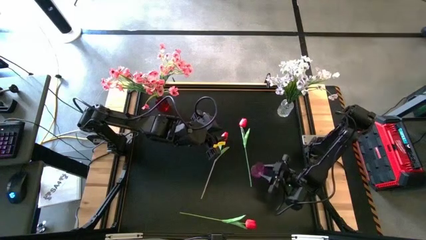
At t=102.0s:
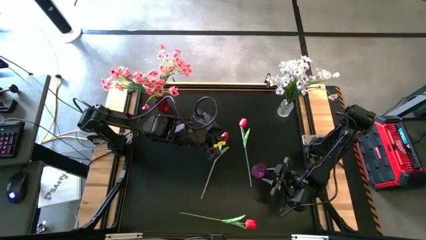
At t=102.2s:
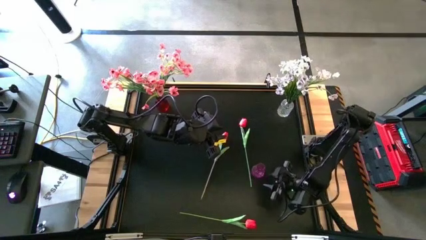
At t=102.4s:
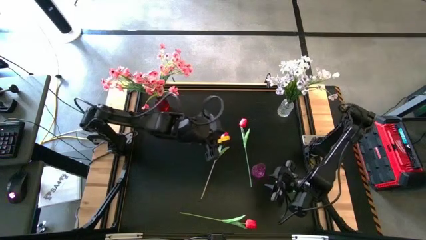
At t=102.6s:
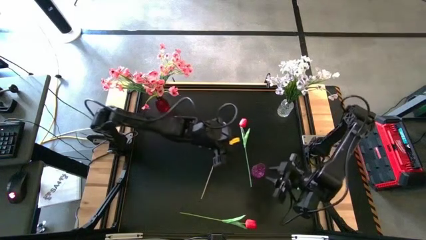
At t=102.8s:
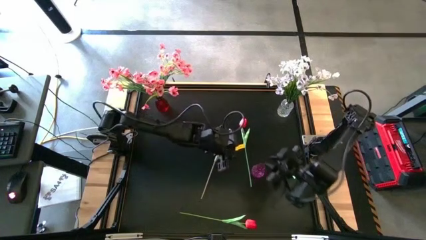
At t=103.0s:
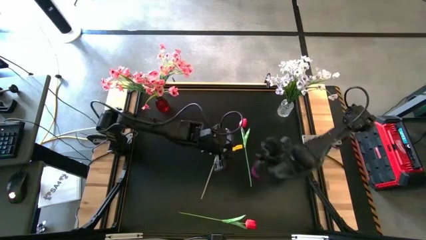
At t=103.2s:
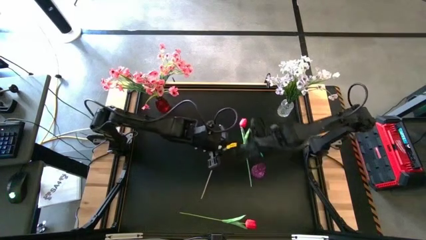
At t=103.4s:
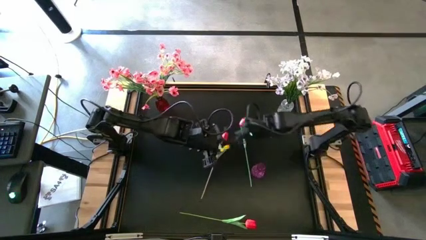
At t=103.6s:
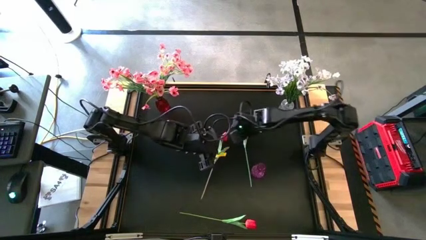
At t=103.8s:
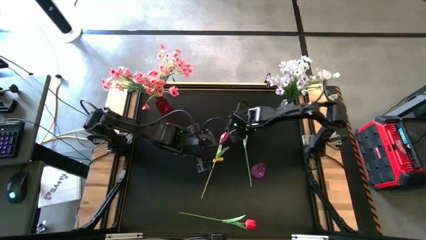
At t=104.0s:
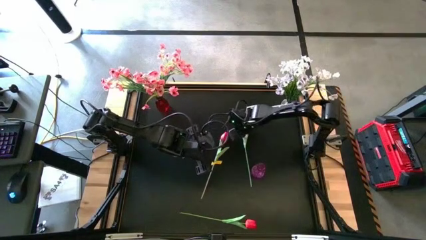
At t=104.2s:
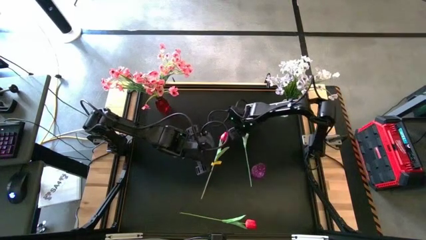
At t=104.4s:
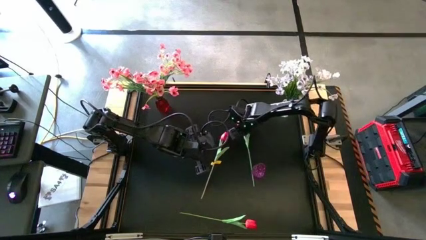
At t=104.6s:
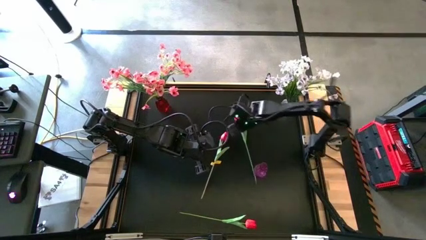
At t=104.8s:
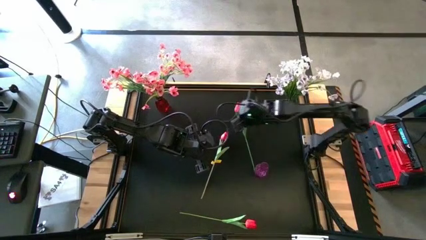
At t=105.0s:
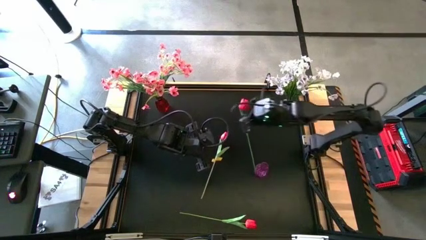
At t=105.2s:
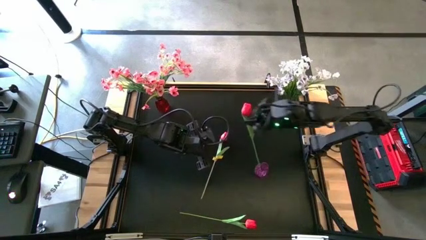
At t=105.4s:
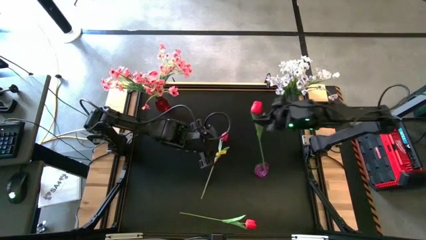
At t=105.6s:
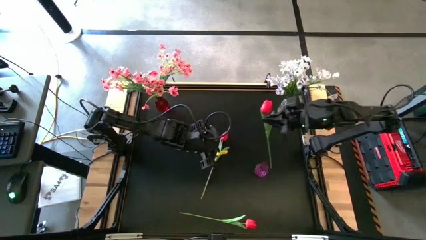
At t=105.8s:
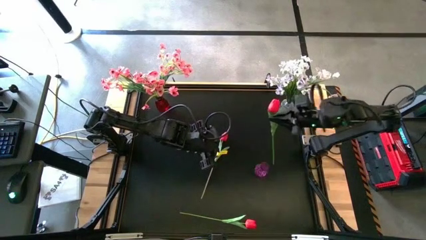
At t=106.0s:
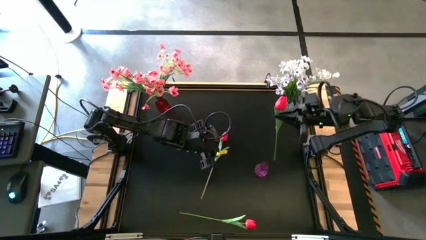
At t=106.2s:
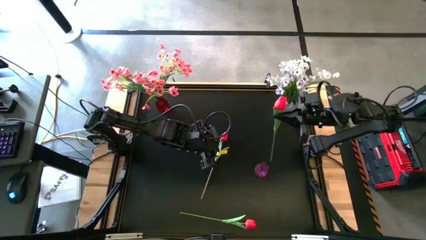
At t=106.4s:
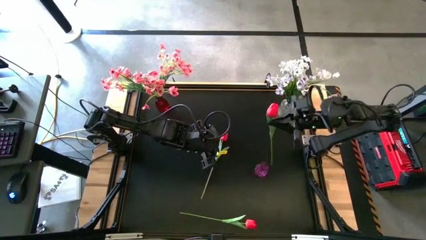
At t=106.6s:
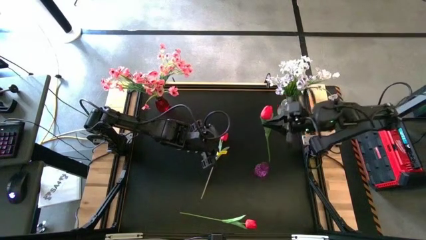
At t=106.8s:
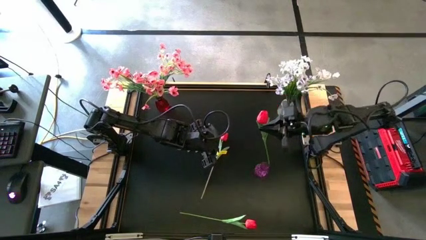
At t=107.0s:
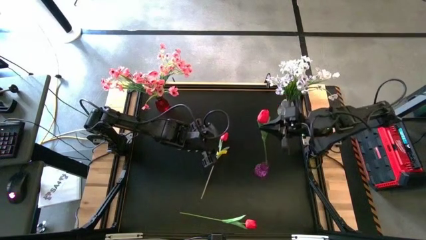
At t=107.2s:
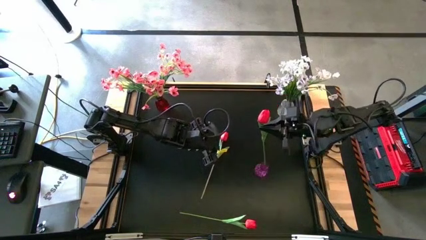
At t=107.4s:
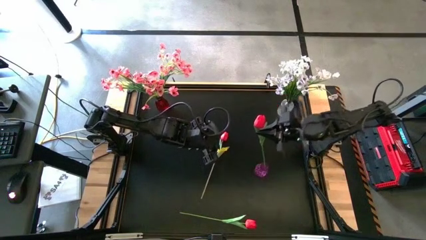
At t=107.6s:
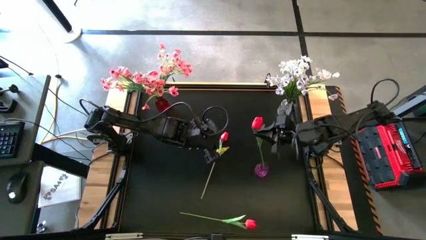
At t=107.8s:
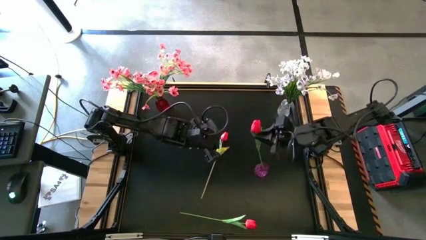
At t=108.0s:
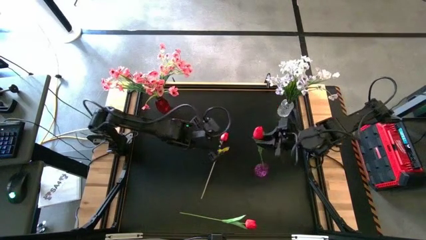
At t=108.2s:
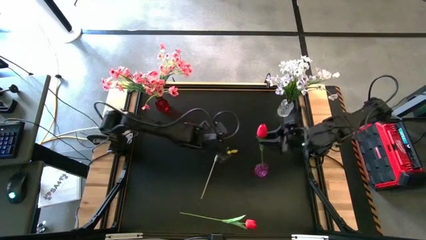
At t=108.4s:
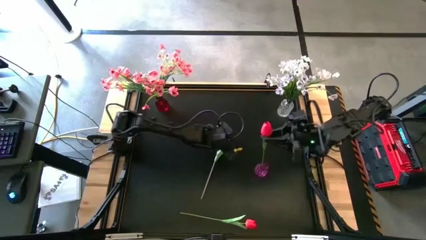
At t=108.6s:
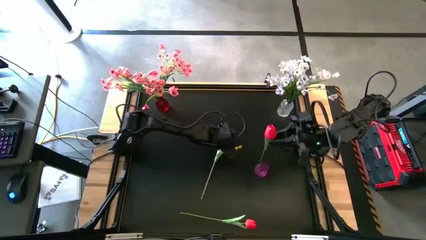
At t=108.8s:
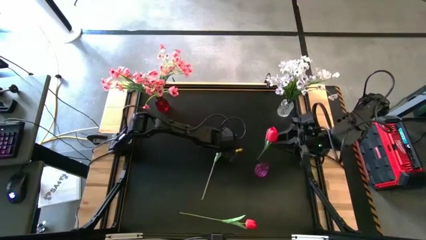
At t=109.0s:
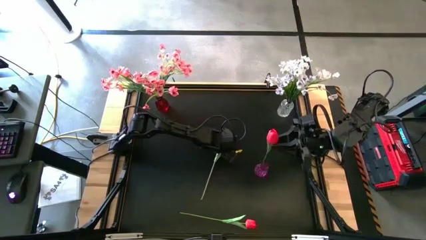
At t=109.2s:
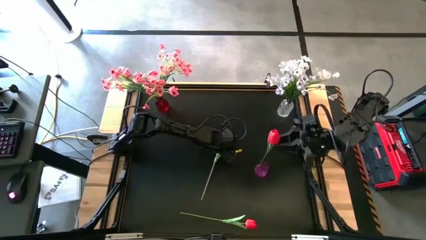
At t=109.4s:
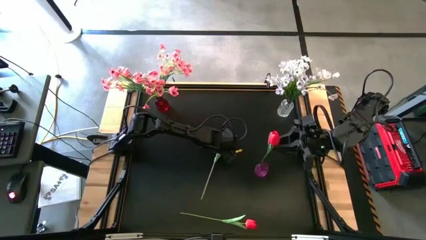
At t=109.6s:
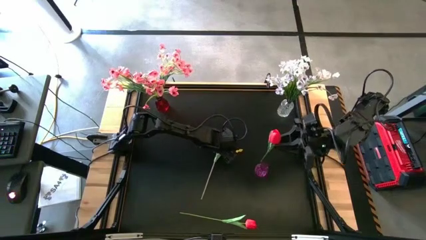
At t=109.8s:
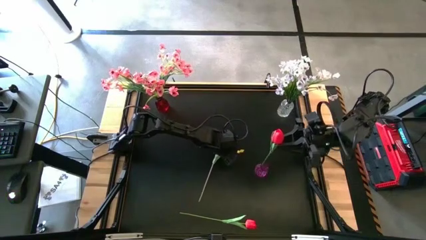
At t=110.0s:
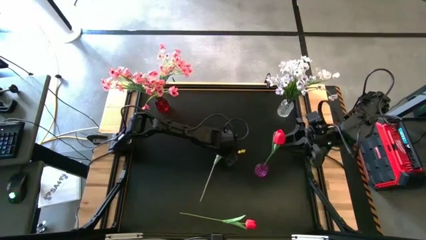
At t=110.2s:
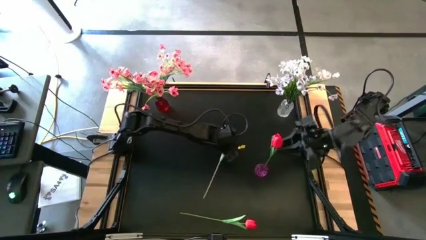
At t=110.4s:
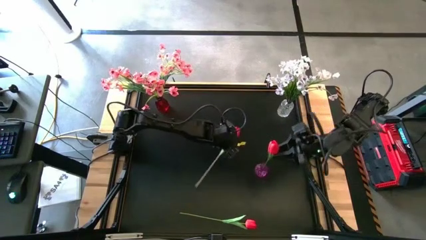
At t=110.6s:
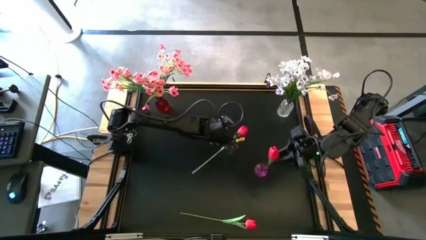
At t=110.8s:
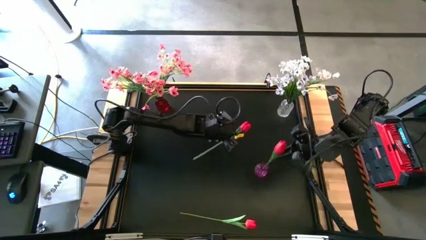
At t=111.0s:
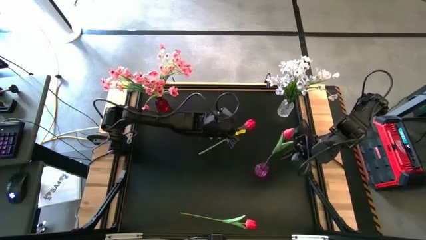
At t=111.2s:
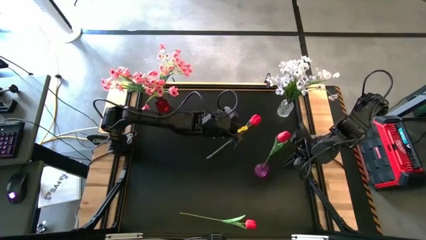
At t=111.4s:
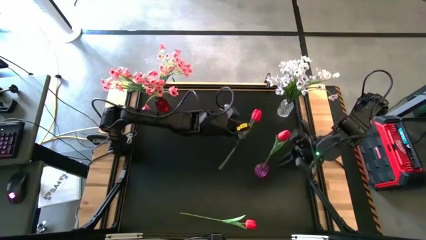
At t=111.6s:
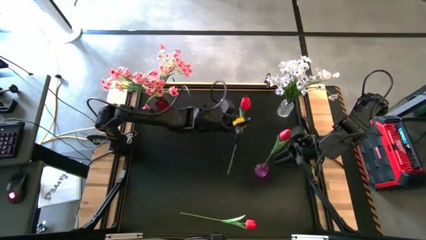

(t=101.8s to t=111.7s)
Task: Sort flowers into vase by color
Put the middle red tulip into the purple flower vase

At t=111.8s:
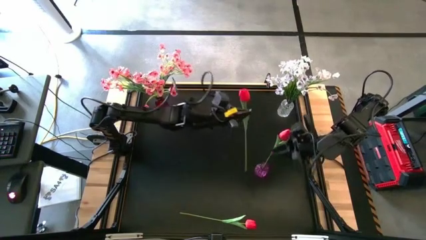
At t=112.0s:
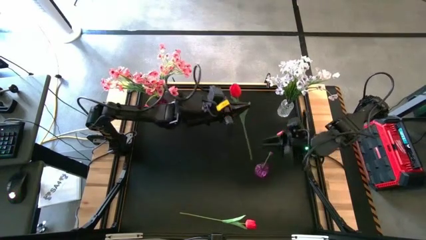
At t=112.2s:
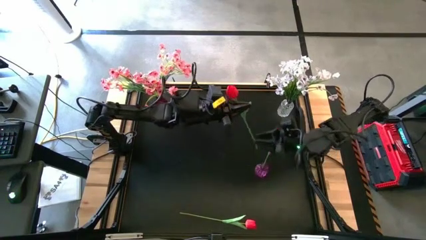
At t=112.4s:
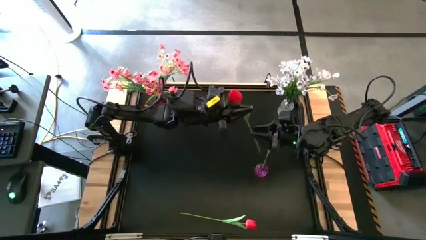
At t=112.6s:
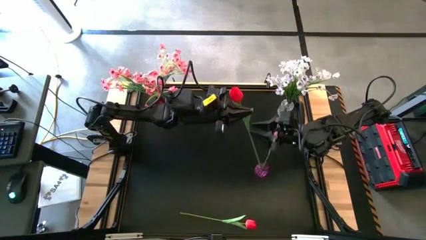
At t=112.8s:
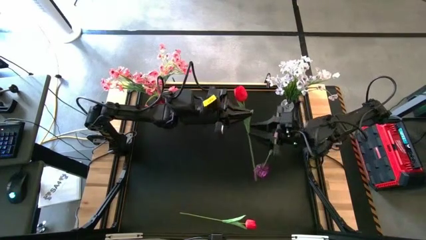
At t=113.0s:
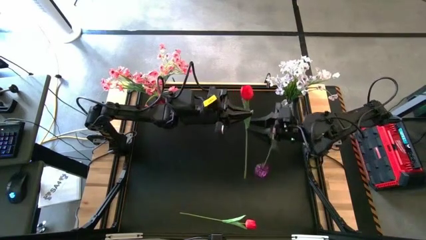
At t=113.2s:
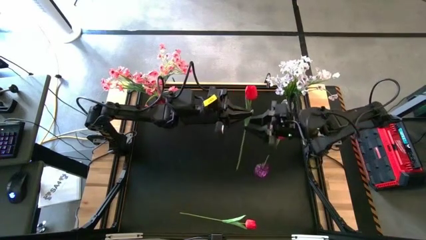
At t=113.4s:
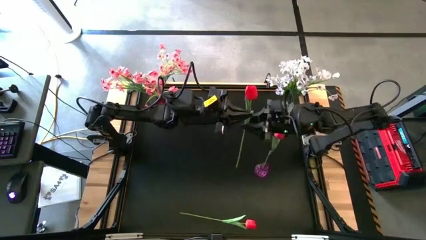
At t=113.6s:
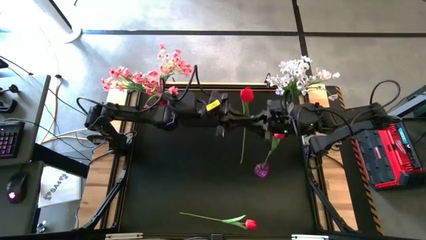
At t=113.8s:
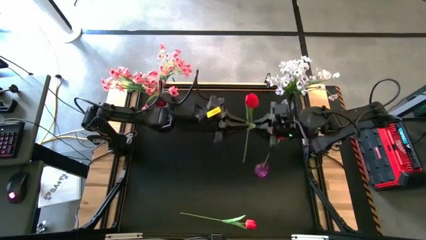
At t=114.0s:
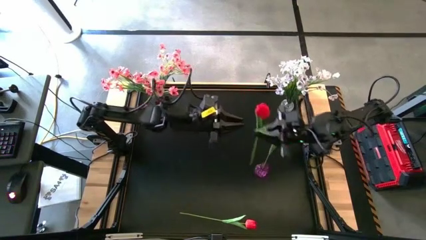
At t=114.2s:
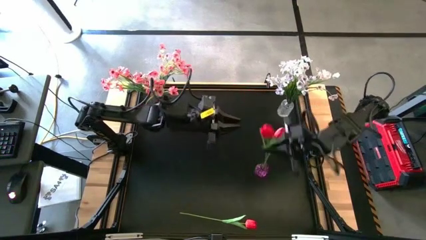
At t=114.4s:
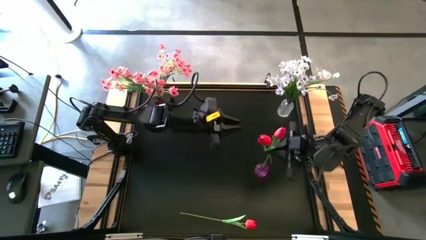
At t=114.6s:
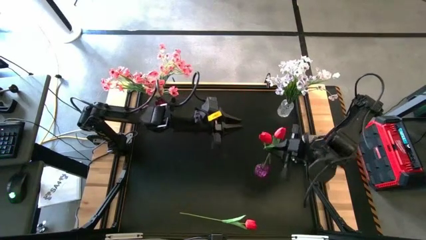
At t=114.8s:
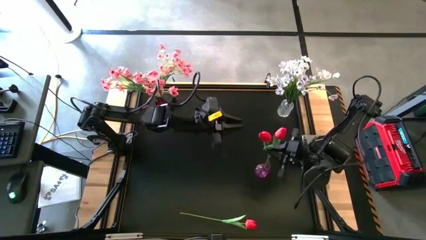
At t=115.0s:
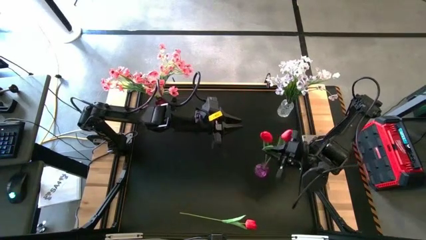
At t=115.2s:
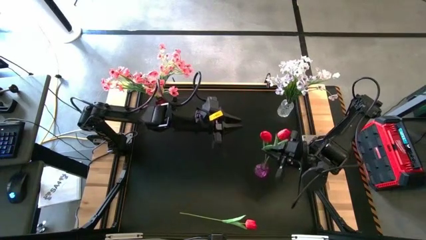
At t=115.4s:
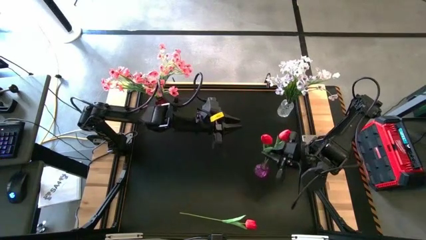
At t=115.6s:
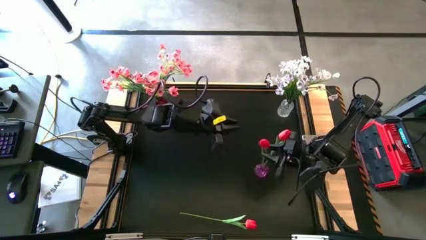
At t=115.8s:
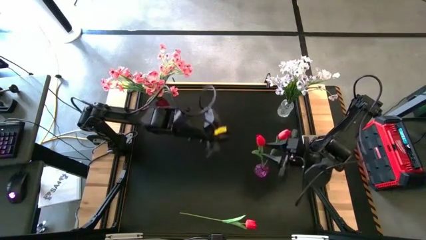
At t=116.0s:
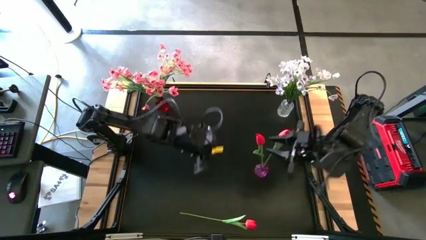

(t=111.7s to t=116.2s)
Put the top red tulip into the purple flower vase
